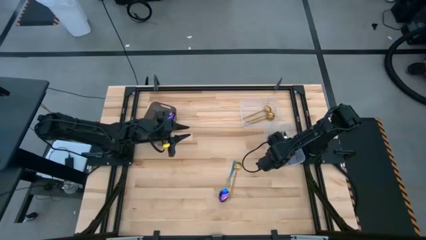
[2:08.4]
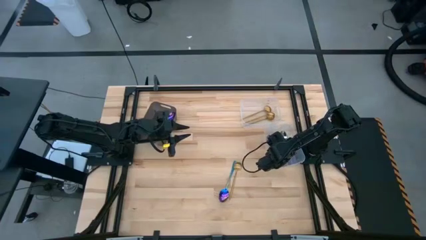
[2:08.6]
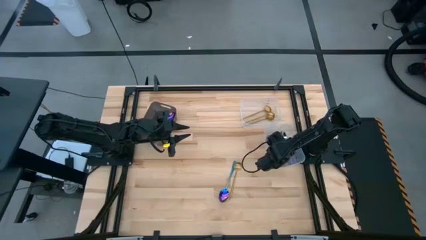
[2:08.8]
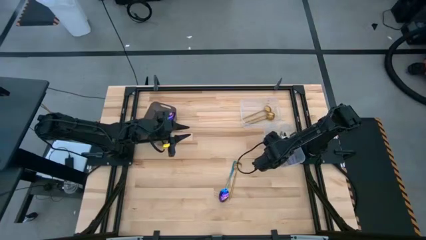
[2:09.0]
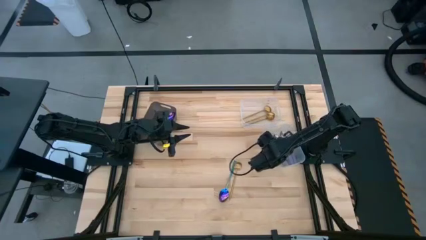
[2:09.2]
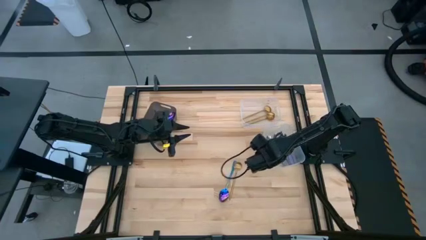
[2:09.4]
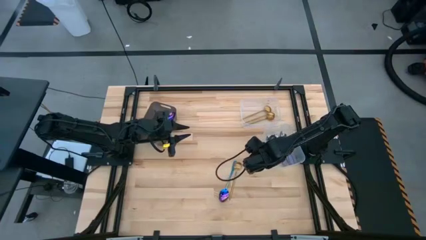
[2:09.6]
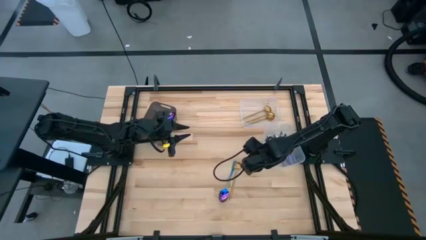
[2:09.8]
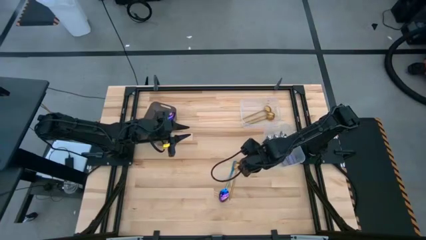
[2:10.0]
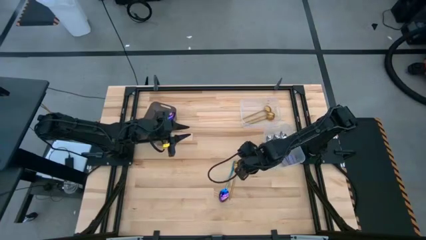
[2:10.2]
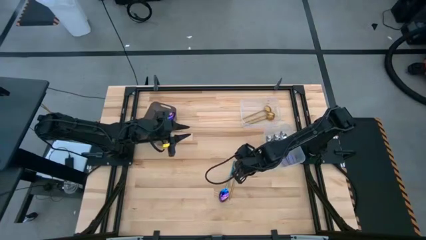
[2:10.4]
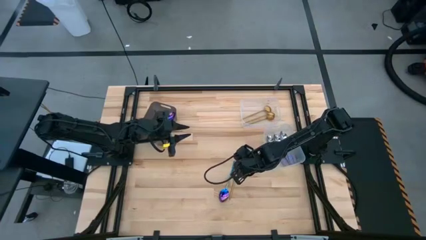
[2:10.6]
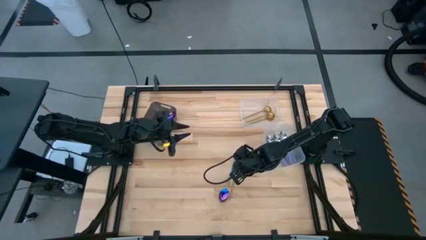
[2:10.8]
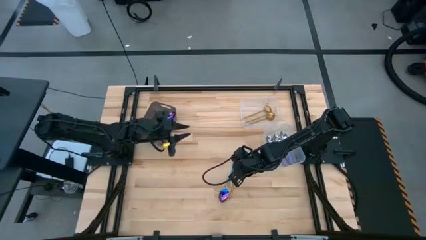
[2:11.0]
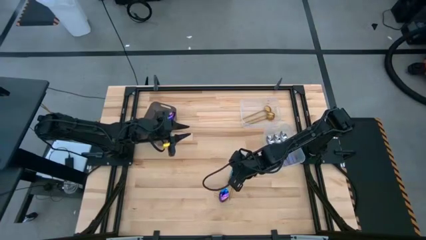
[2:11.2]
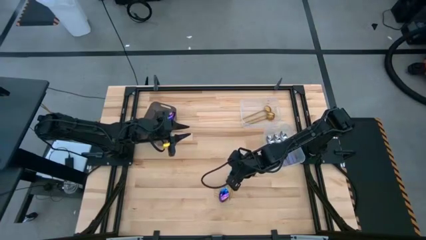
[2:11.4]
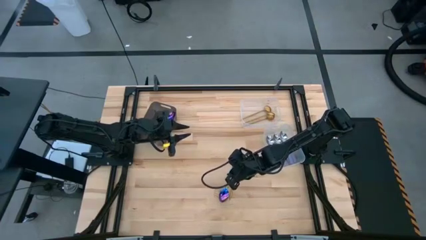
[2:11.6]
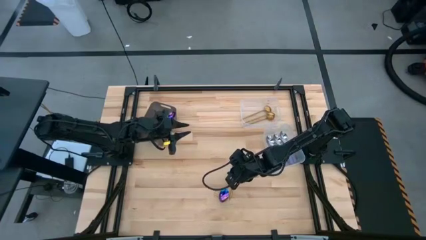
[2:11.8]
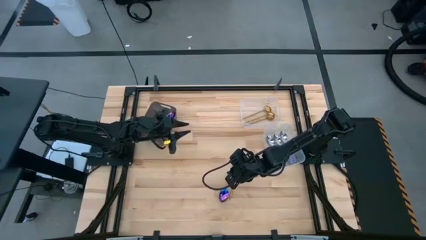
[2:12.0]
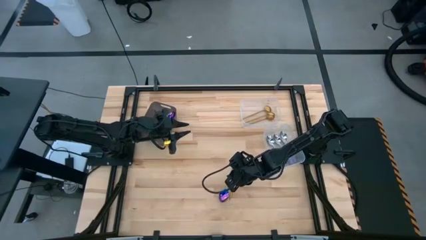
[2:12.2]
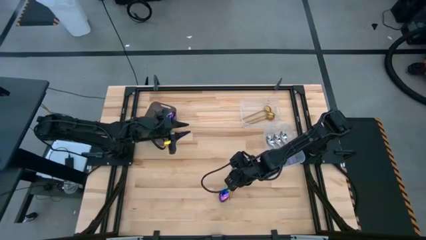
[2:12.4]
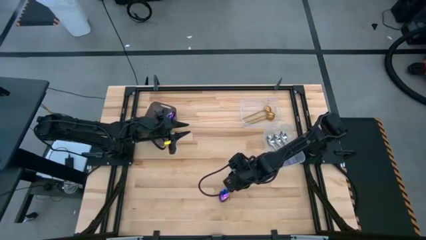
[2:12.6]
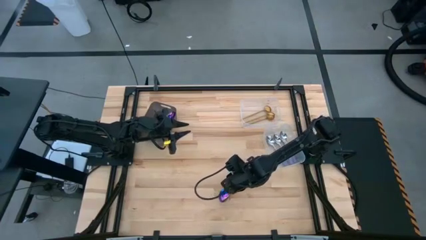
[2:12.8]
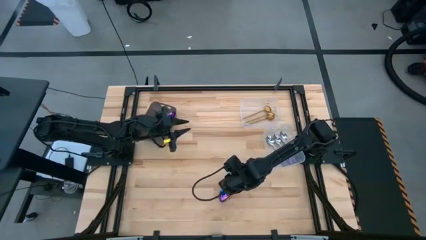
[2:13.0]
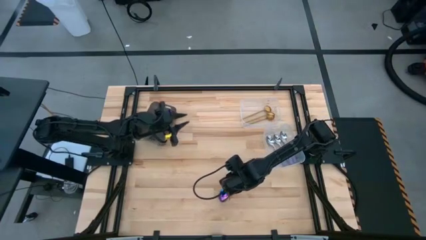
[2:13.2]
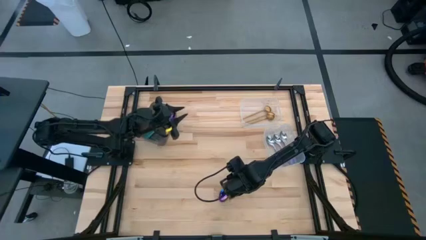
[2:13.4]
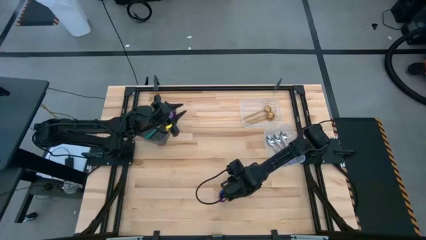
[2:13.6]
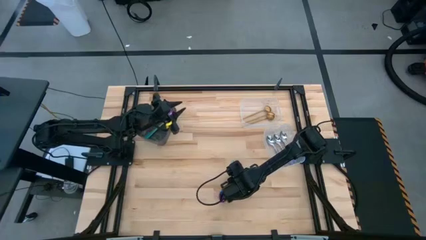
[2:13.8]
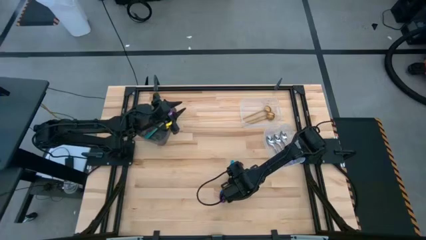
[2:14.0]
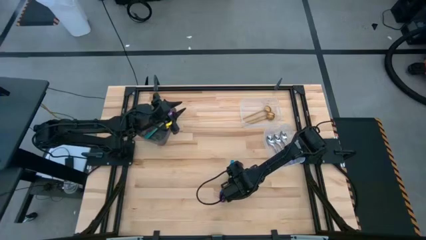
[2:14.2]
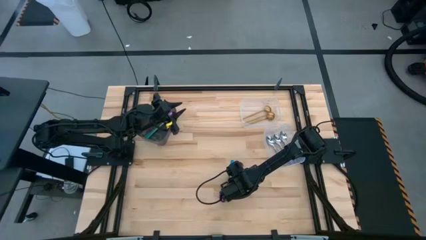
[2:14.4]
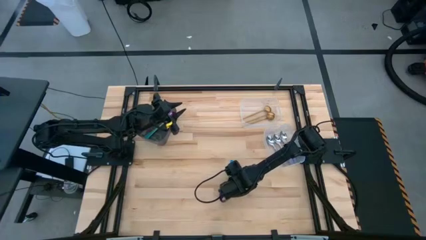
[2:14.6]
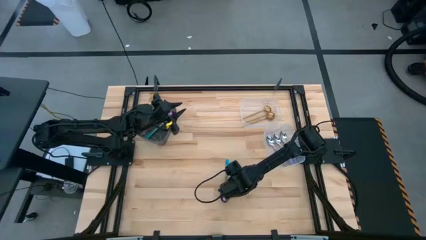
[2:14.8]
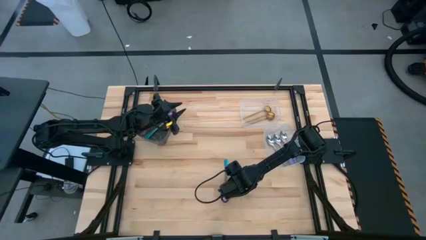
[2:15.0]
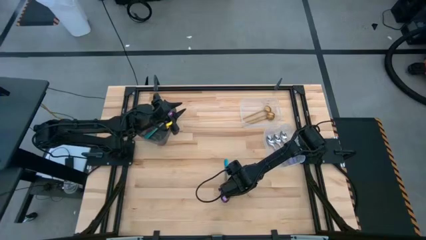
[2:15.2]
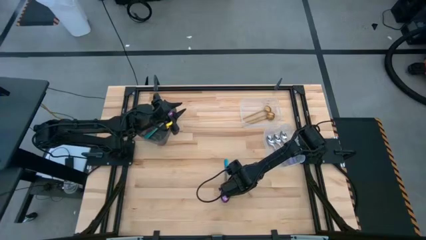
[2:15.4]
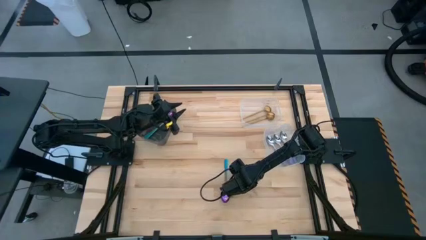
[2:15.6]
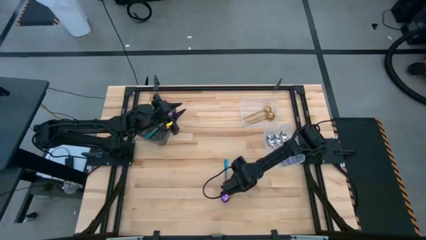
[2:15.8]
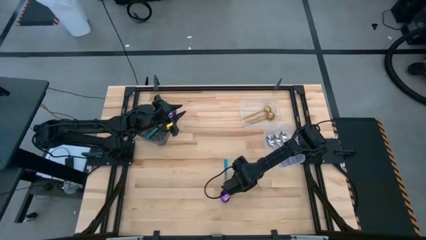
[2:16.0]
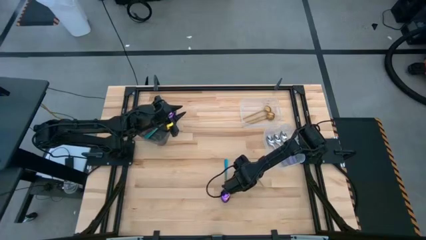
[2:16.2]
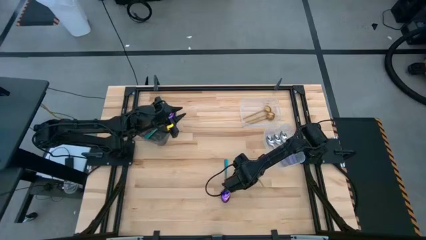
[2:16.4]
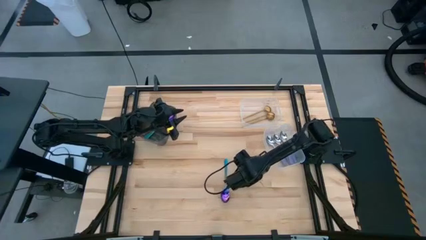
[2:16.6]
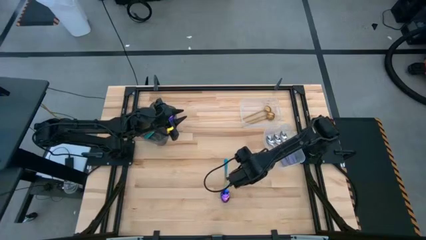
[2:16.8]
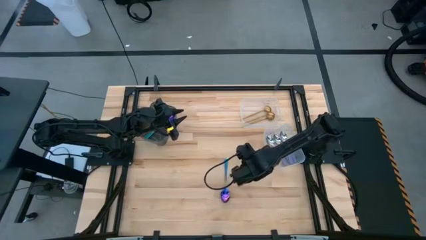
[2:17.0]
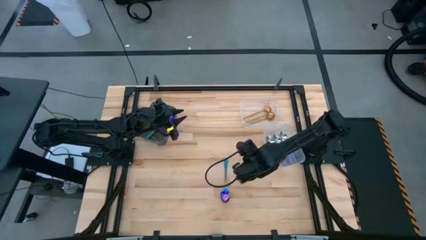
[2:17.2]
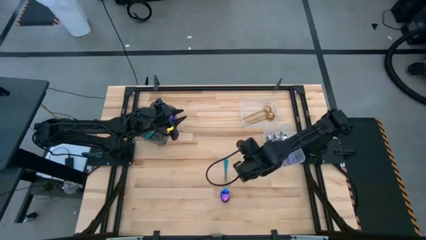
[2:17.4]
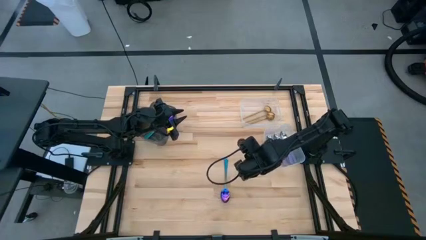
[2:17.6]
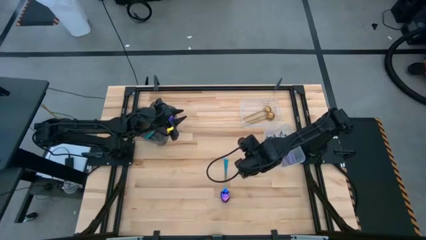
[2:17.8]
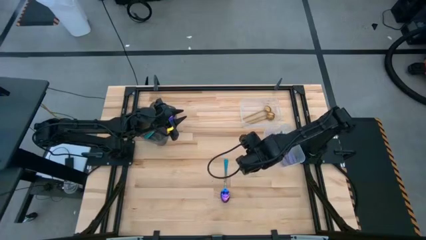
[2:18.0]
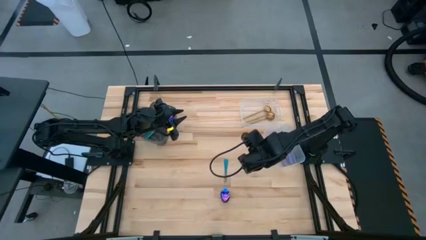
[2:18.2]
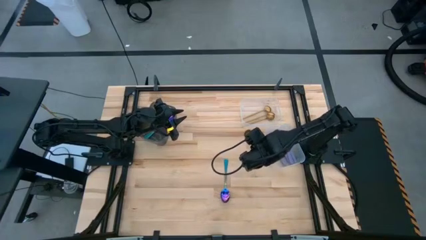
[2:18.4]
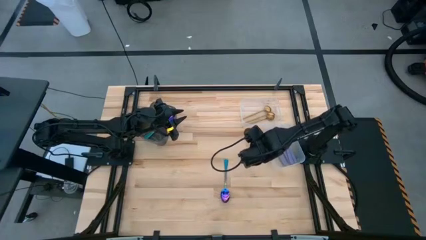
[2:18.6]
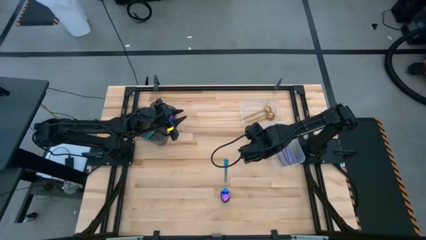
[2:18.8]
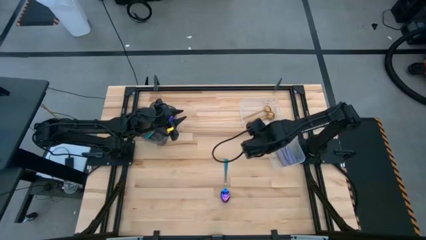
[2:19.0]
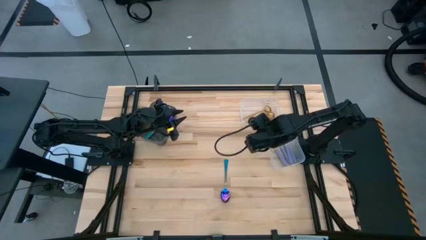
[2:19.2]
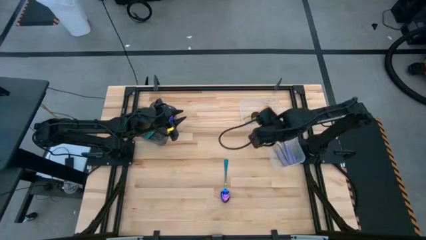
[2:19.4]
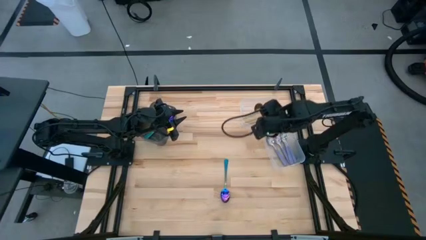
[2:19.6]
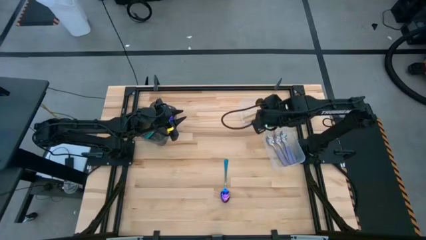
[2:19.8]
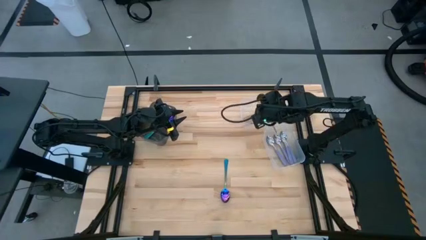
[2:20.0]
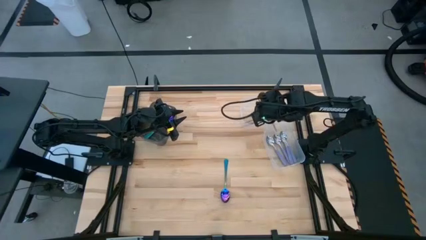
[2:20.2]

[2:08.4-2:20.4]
Task: Sort silverware by color (type)
Put the gold spoon into the top transparent bin

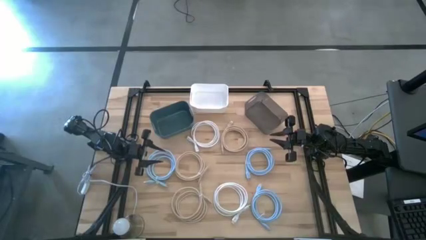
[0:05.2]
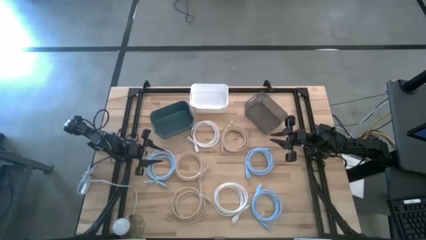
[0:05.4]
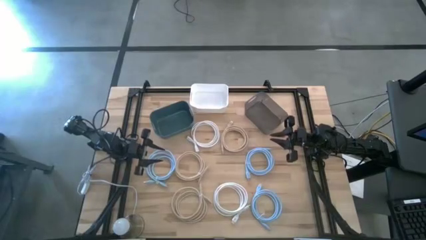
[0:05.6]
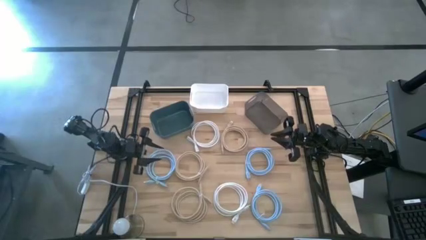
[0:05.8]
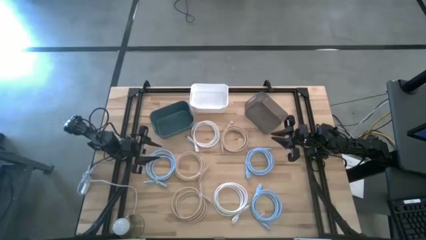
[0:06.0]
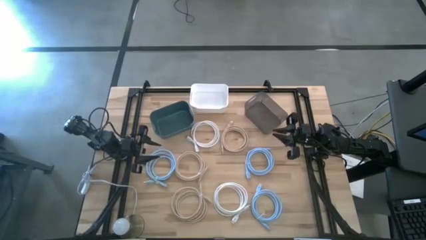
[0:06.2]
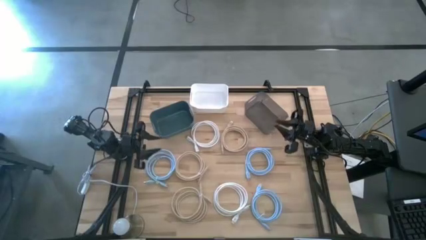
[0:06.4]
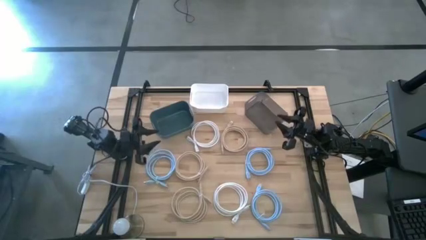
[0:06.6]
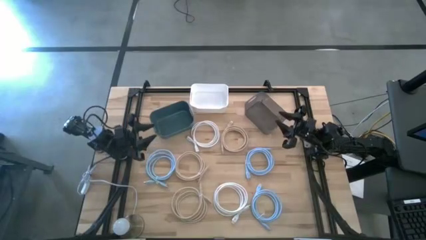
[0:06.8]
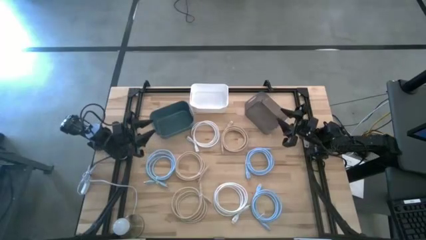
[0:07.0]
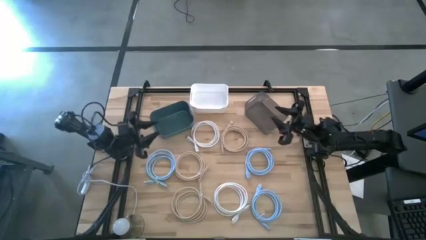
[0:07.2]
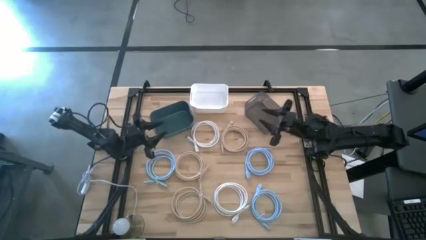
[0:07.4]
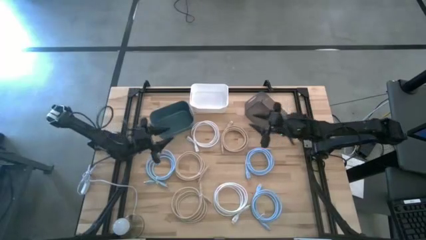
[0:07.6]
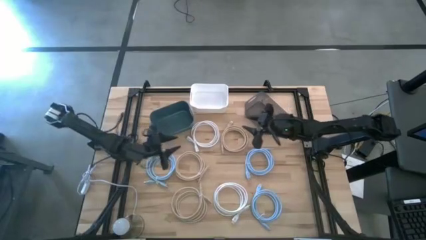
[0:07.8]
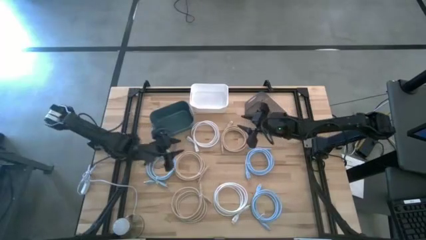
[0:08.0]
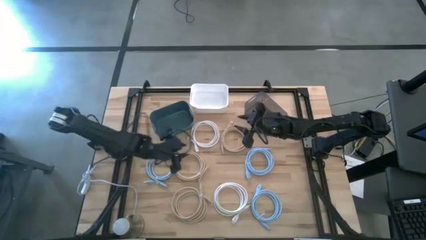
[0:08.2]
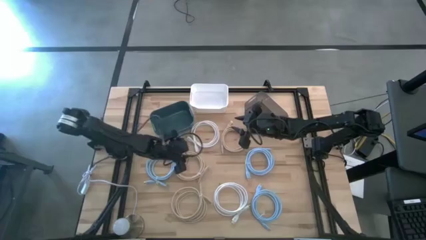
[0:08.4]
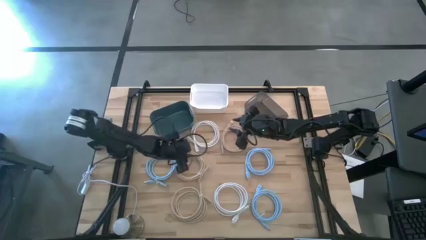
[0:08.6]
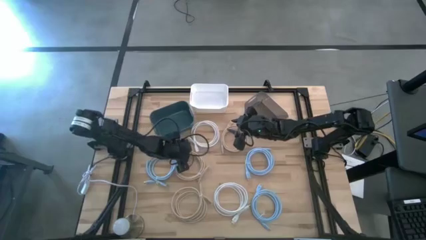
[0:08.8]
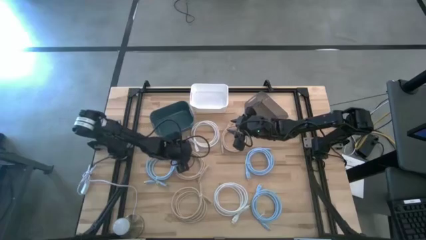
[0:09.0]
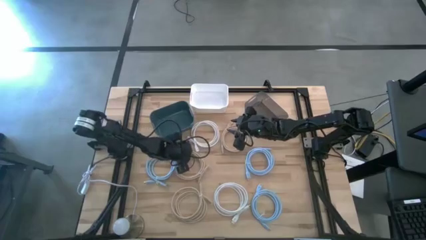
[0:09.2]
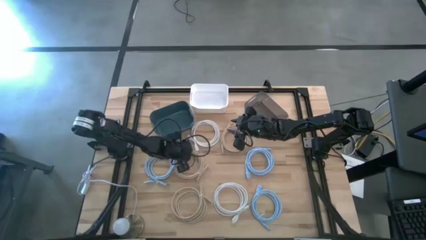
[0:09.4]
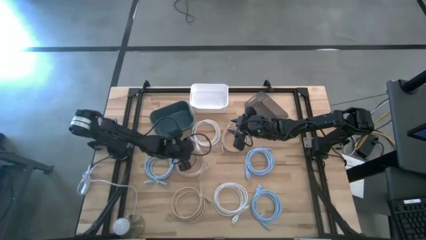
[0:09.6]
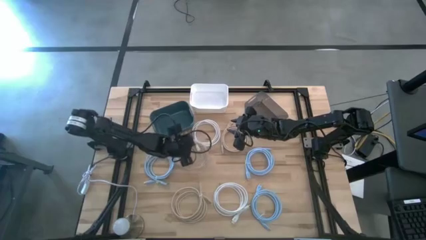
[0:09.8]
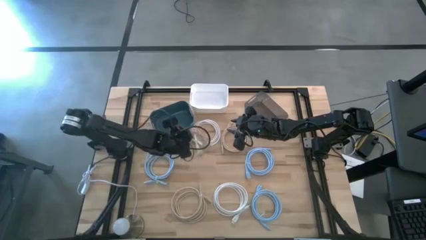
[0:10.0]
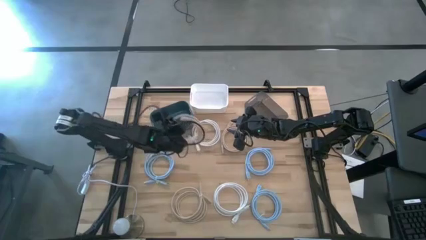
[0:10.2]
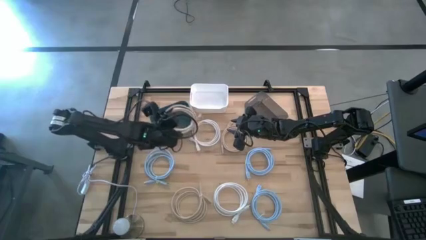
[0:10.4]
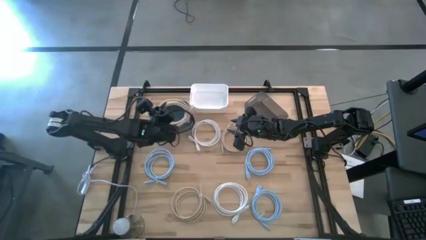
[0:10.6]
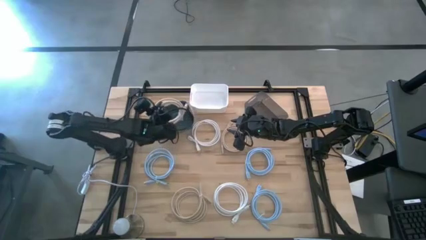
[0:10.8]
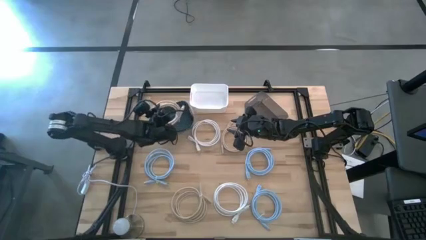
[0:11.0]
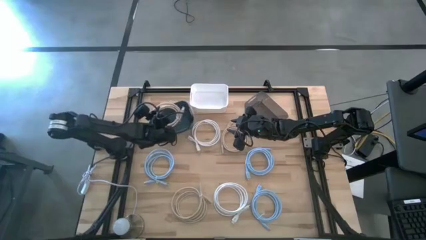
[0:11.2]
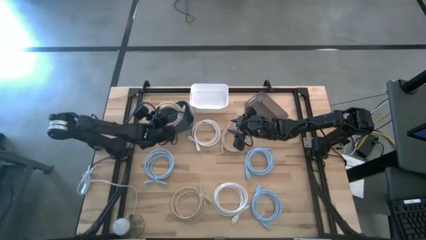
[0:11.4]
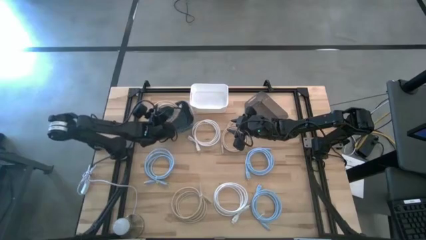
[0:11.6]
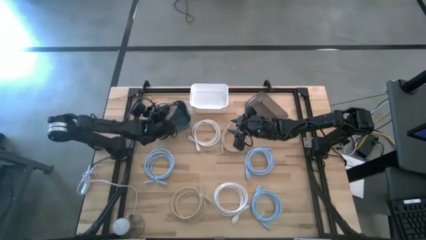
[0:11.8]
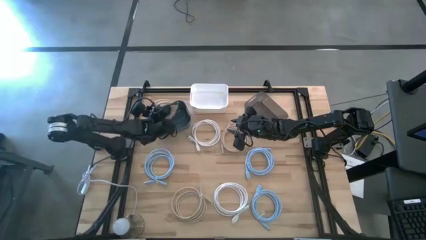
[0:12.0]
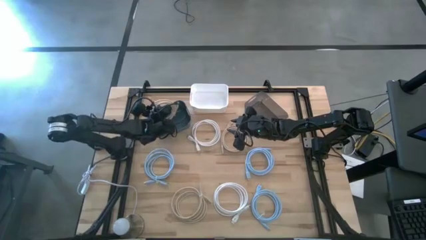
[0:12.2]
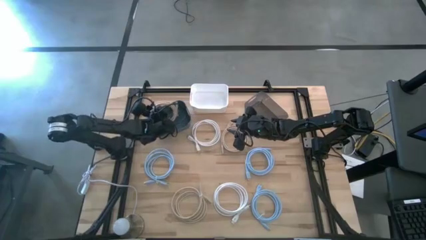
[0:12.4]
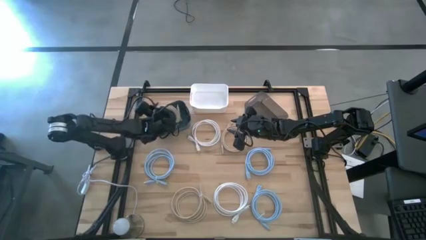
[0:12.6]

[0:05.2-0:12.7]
Task: Sort HDMI cables
Put the middle light brown HDMI cable into the blue bin
